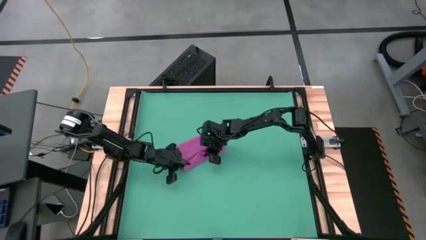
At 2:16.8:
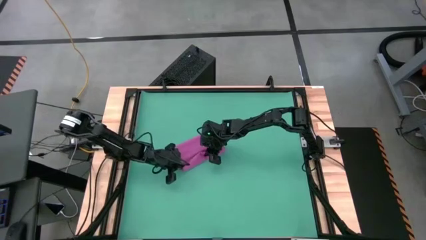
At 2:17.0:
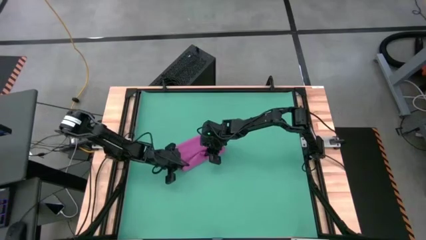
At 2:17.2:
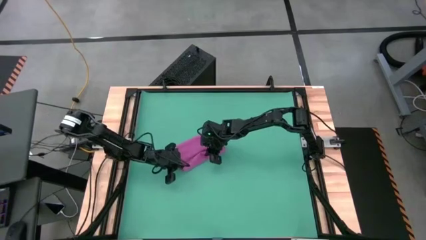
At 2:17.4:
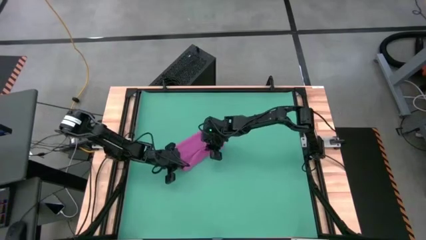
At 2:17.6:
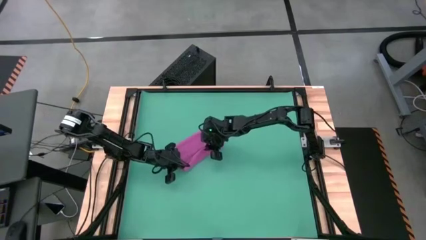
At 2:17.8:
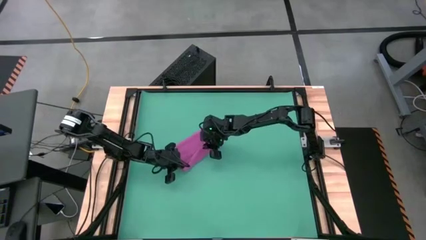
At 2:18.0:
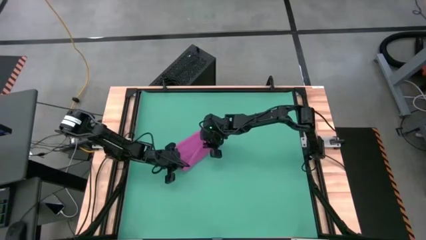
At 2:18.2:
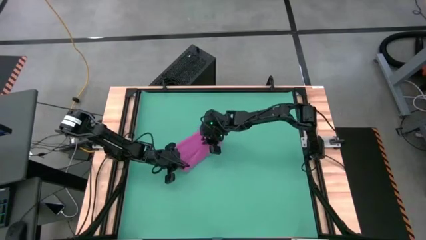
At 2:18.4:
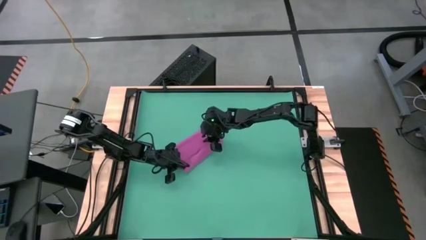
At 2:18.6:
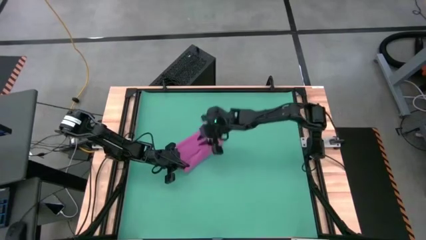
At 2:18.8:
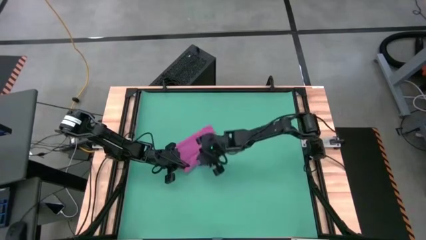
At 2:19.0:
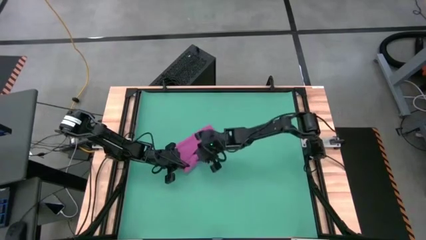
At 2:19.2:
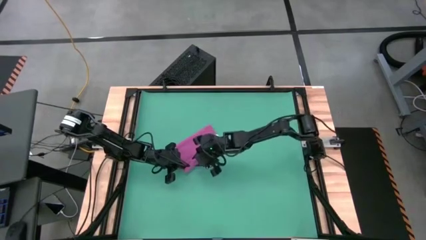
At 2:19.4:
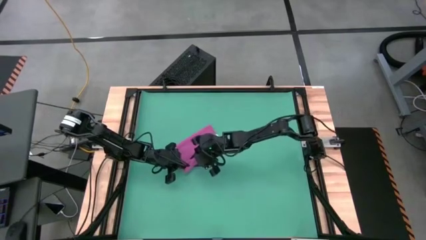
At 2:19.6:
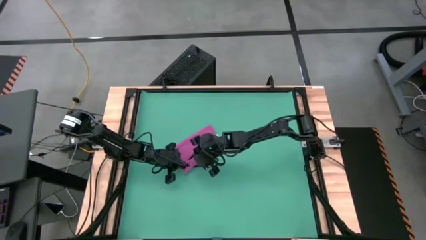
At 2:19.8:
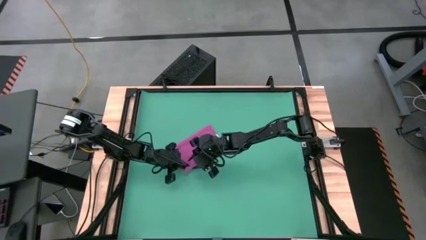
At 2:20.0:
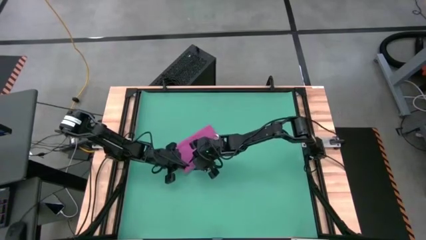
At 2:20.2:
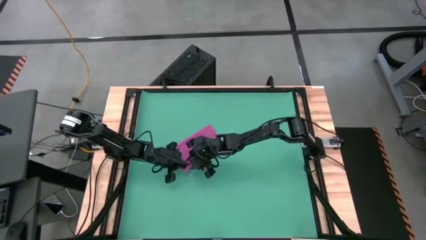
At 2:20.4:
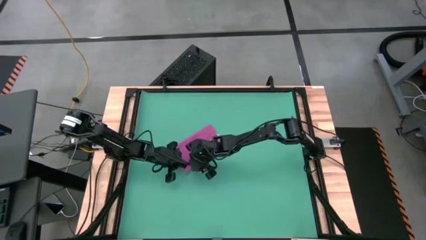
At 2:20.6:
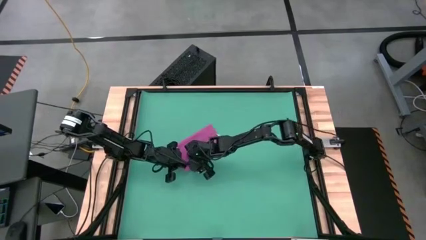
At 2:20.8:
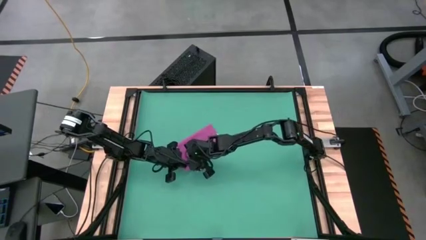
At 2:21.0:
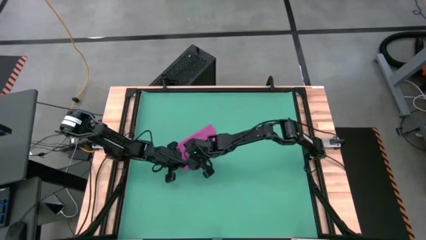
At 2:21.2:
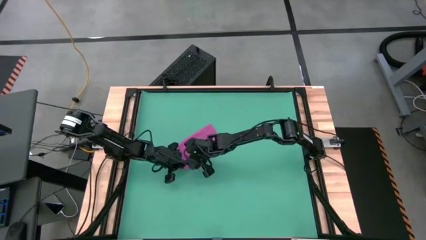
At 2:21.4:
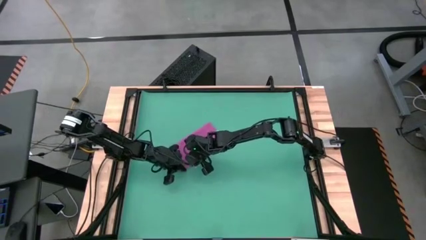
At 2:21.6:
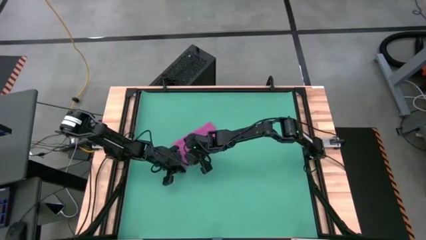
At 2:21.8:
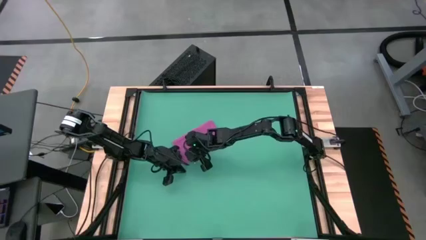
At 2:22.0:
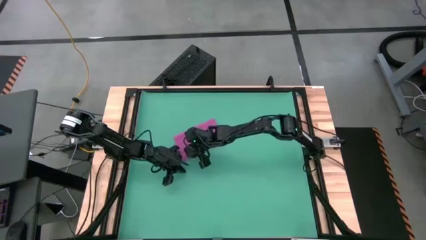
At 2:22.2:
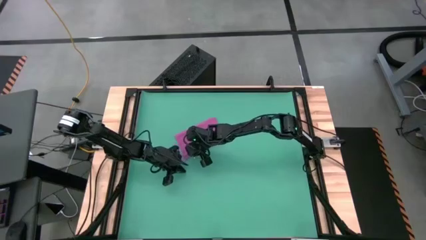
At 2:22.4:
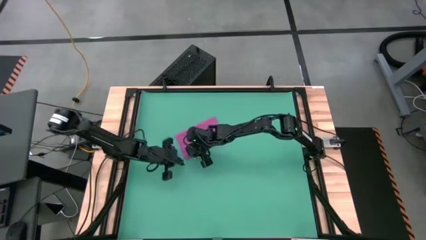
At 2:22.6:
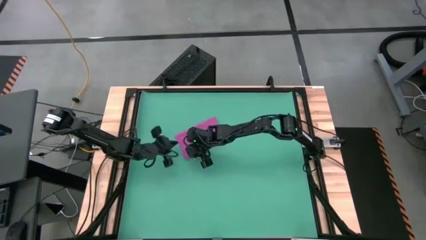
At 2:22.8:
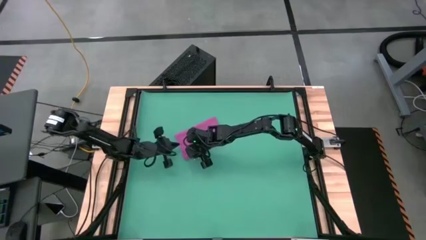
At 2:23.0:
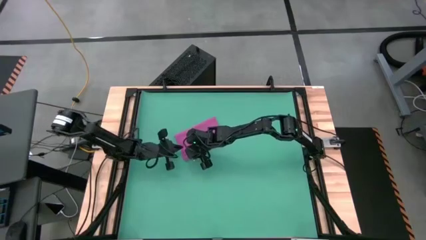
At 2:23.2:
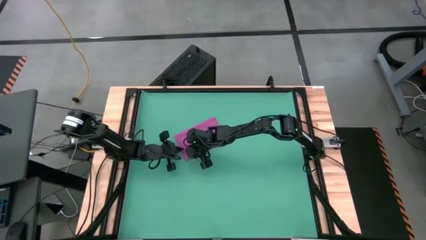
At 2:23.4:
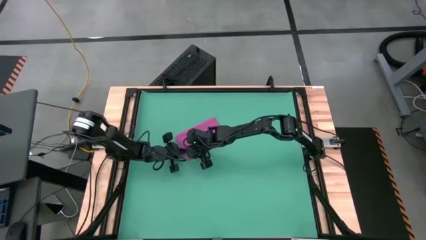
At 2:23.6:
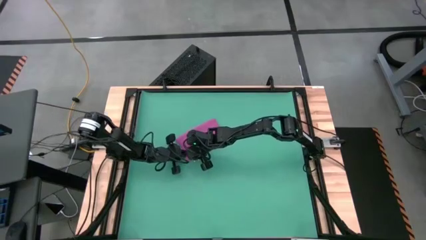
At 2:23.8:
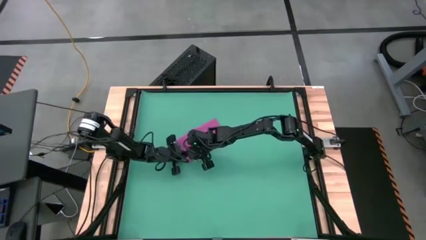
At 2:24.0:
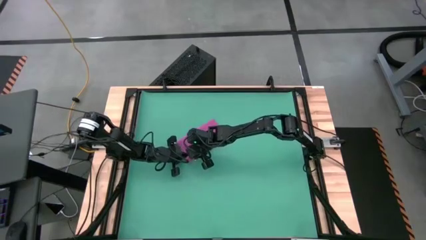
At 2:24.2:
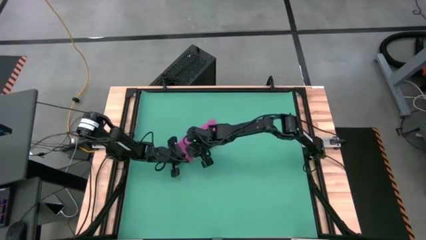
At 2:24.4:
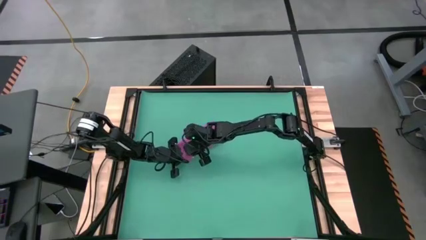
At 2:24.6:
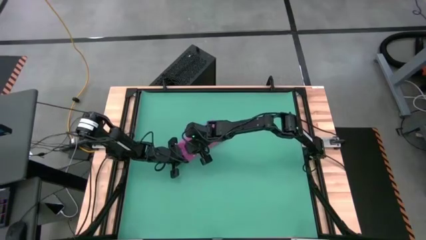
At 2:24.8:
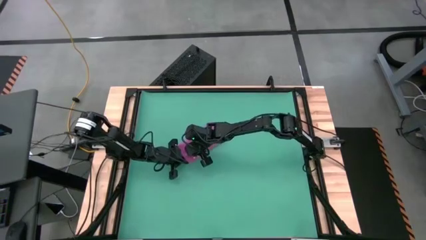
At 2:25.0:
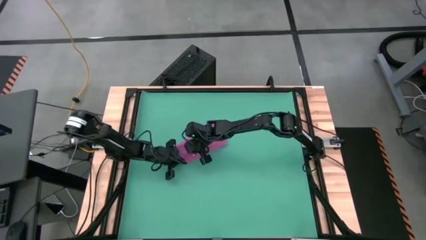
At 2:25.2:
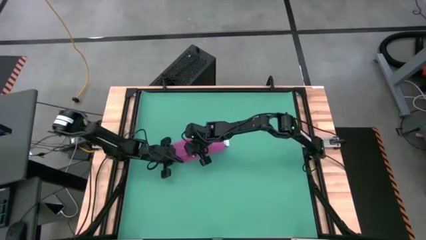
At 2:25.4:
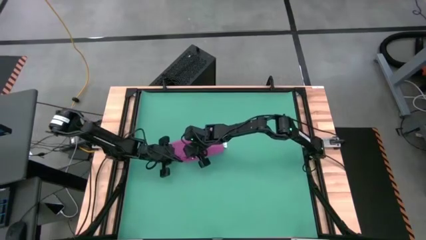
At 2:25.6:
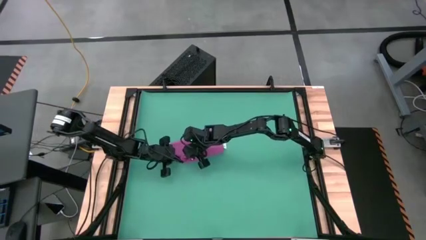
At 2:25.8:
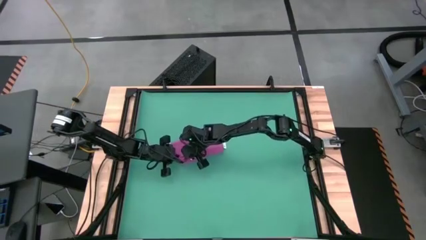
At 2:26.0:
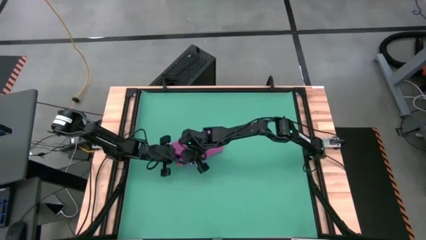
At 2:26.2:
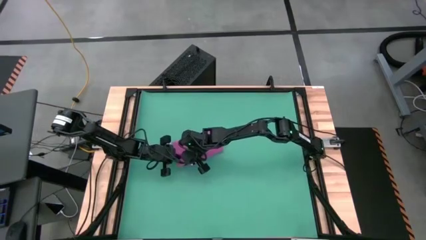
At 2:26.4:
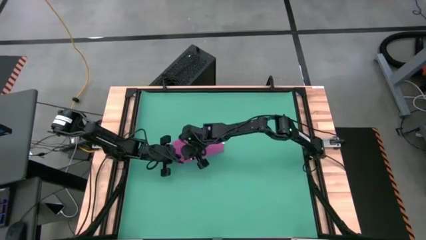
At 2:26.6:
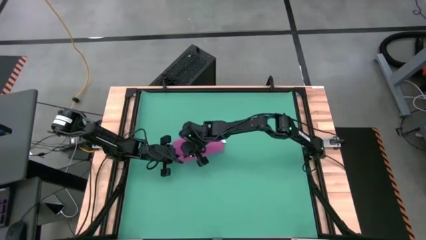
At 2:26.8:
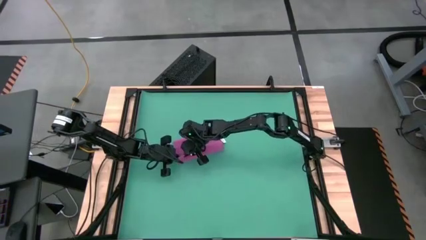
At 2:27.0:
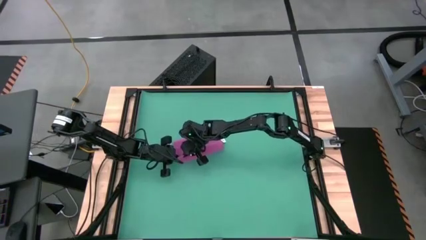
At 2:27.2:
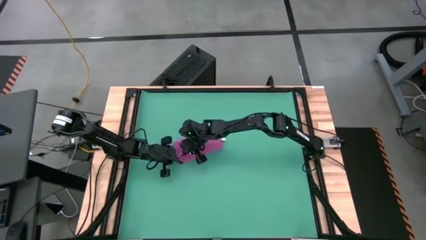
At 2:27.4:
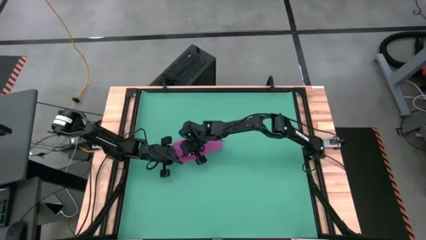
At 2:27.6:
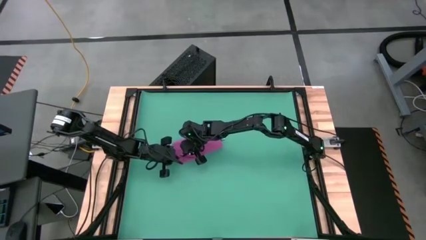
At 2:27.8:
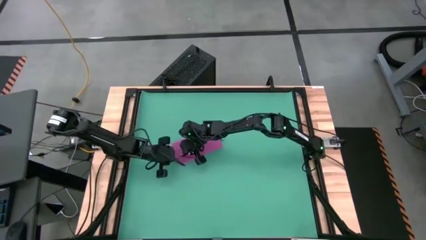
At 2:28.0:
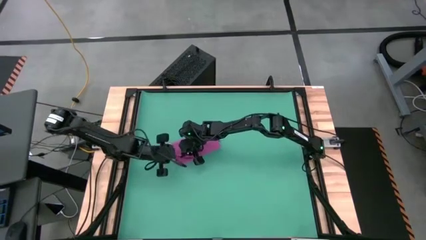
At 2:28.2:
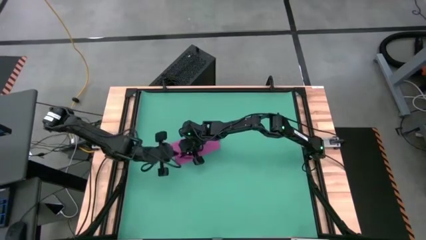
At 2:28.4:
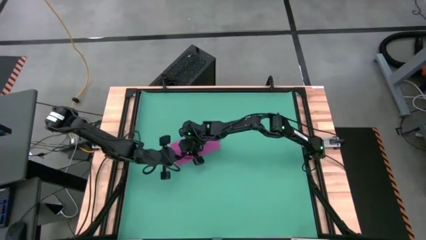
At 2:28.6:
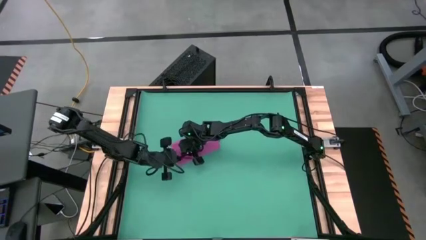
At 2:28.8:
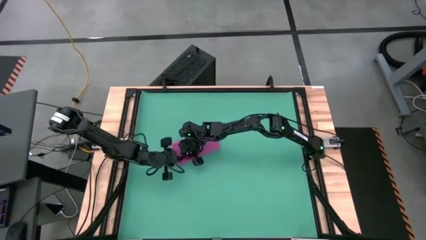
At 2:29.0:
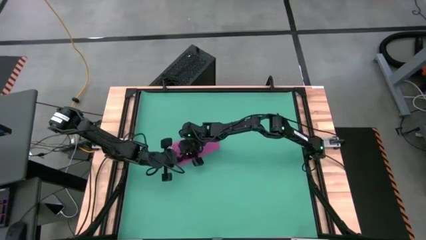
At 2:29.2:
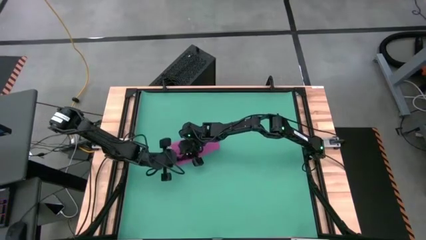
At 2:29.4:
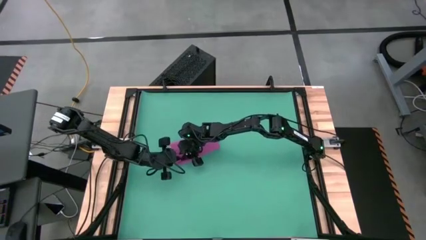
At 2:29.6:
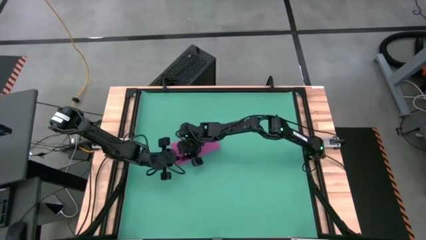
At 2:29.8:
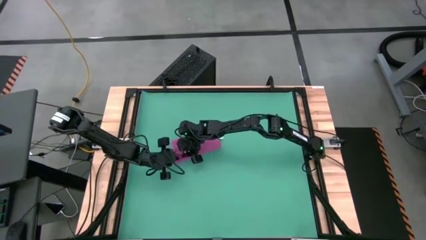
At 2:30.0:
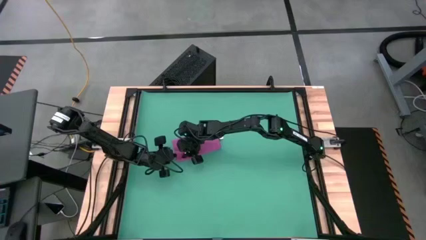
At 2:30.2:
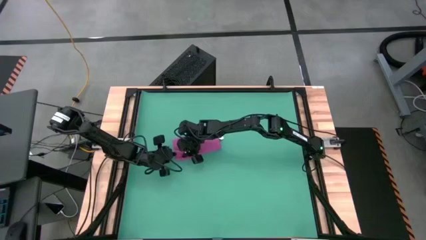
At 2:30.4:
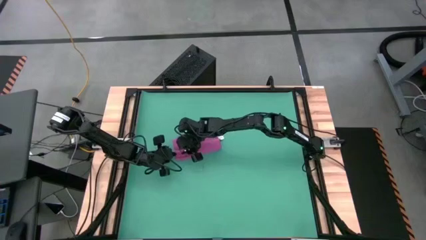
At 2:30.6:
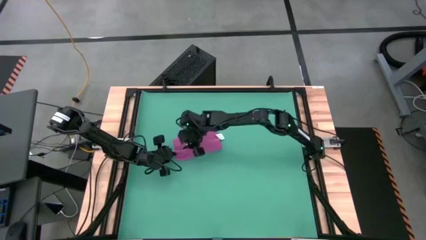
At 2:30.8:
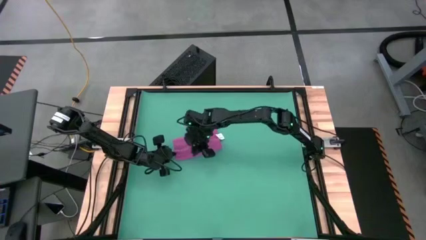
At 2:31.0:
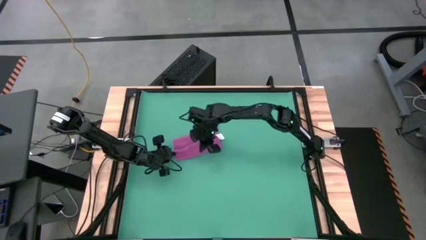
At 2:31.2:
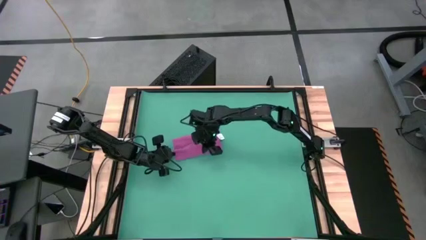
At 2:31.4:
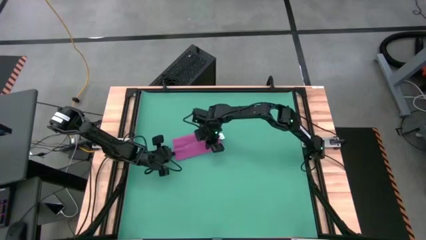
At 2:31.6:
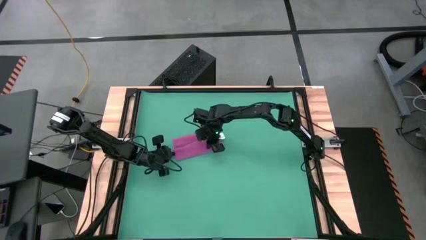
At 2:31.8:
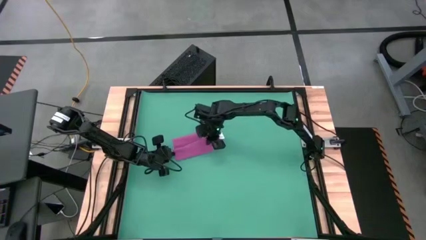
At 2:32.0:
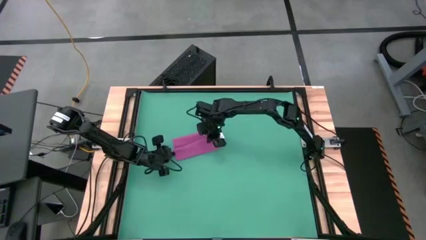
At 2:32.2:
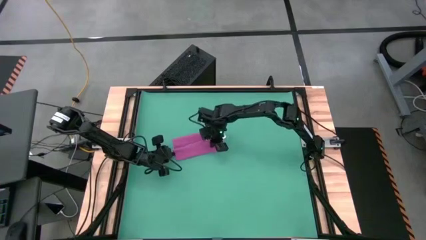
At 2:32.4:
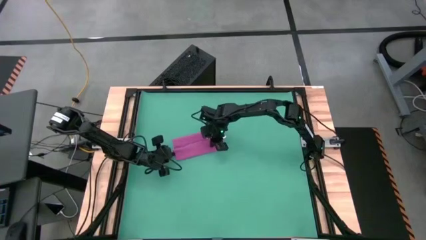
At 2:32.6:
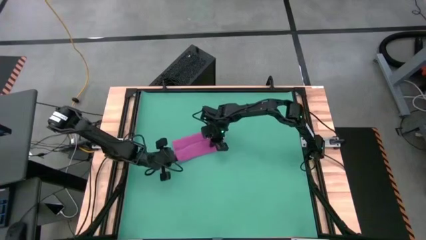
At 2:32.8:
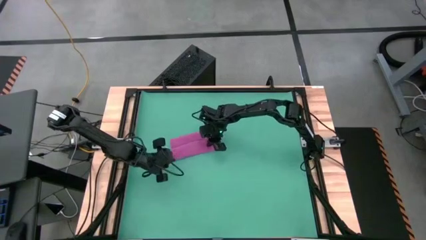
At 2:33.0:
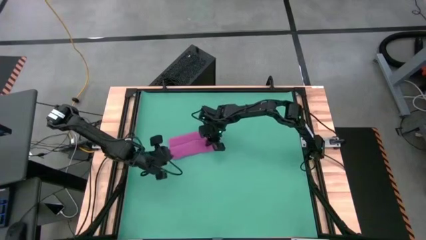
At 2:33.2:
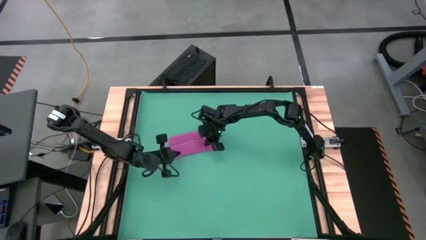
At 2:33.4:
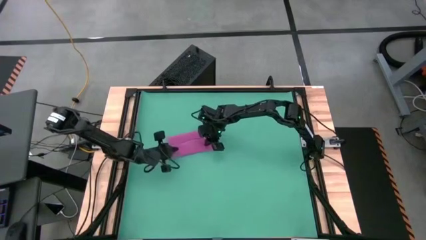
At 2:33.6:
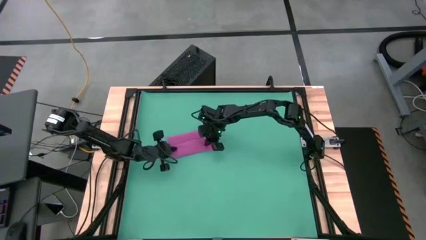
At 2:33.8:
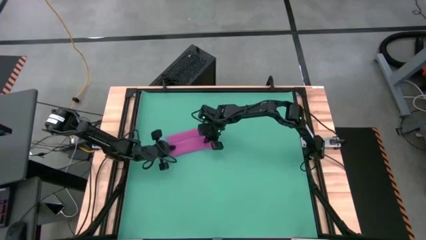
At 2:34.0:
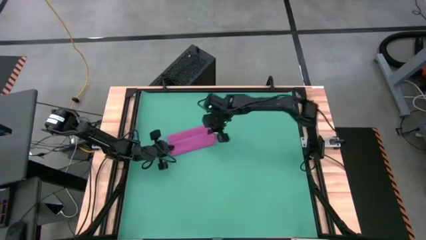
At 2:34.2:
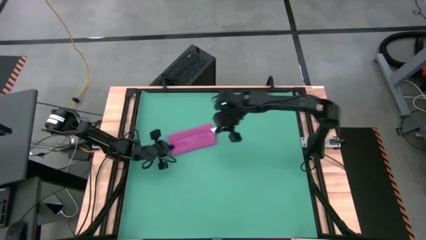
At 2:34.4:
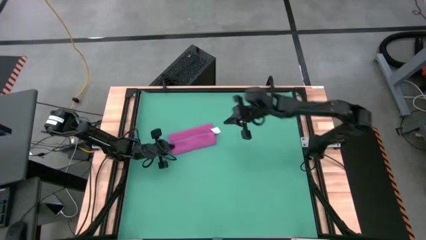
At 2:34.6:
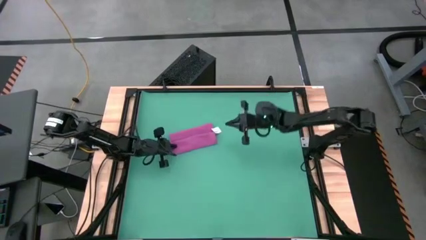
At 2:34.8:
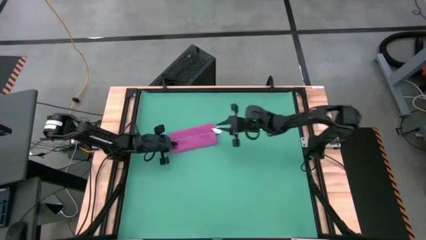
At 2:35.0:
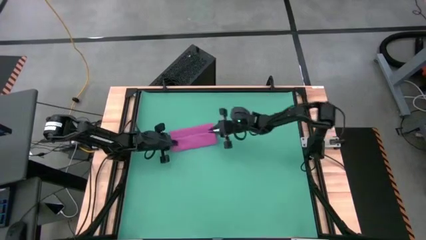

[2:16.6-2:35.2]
Task: Roll towel into tight, uniform cylinder
Roll the pink towel
